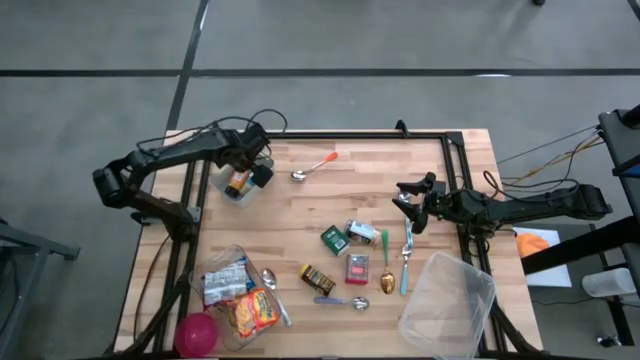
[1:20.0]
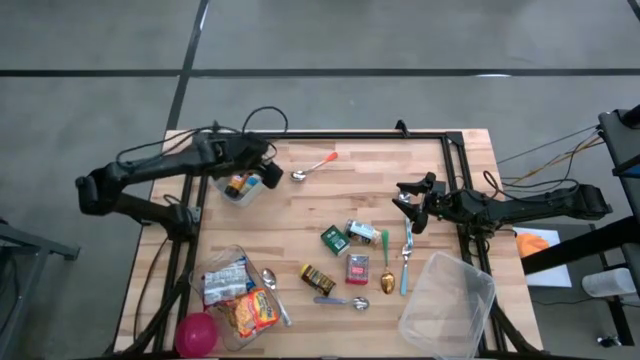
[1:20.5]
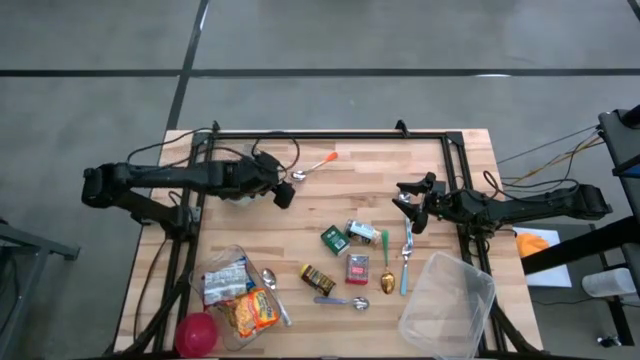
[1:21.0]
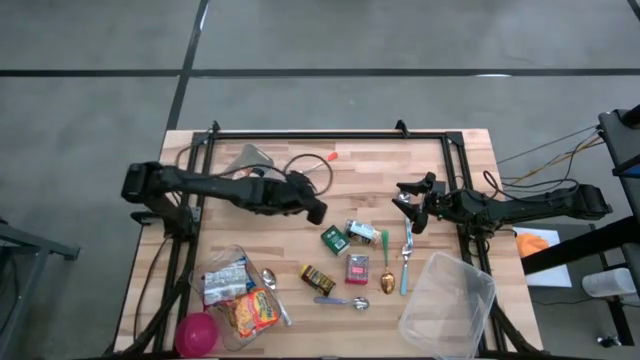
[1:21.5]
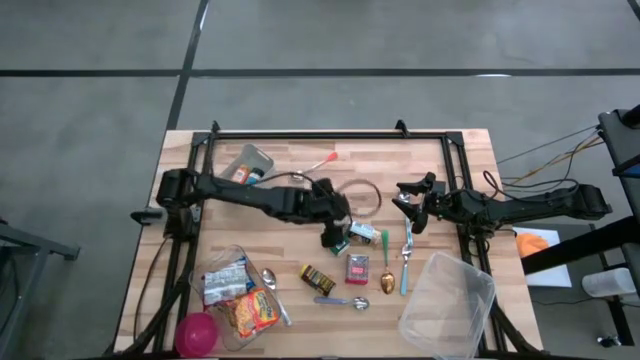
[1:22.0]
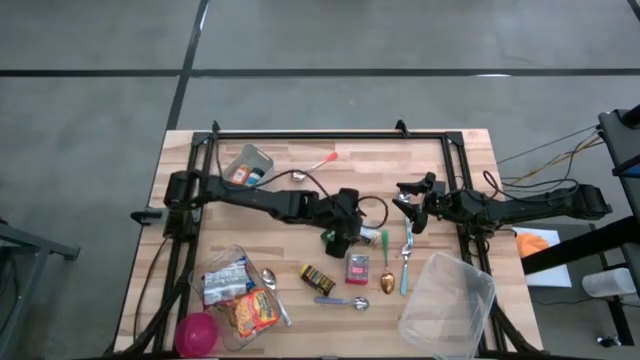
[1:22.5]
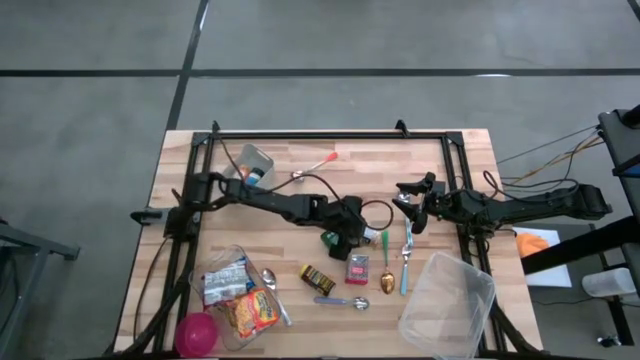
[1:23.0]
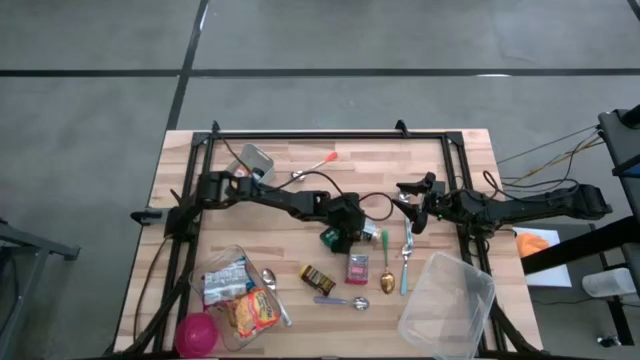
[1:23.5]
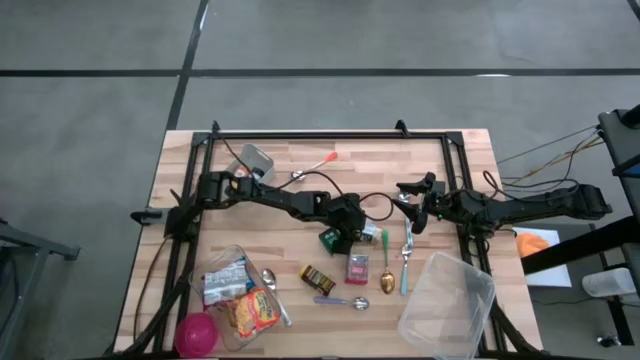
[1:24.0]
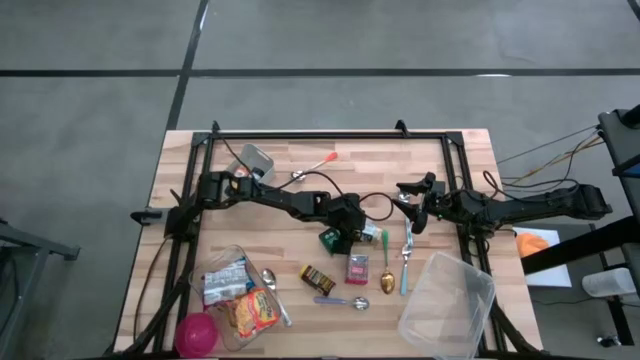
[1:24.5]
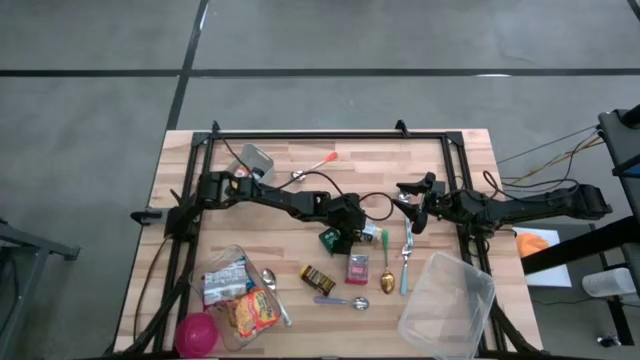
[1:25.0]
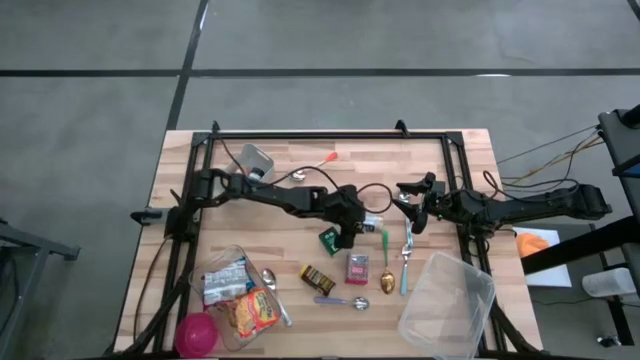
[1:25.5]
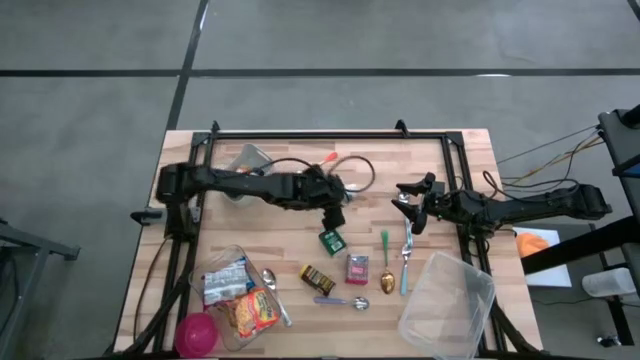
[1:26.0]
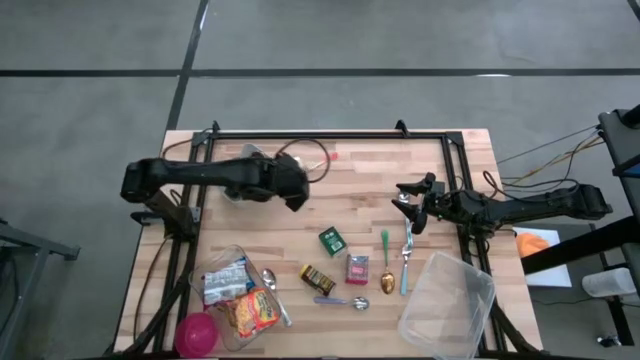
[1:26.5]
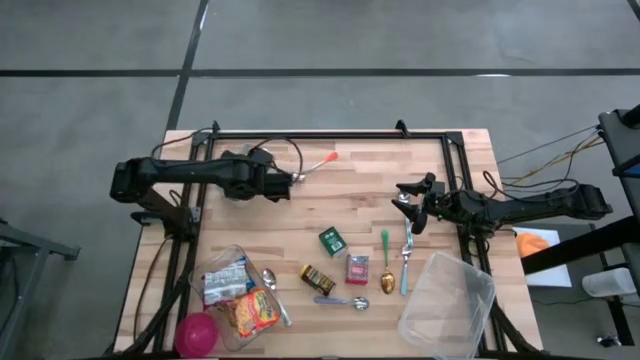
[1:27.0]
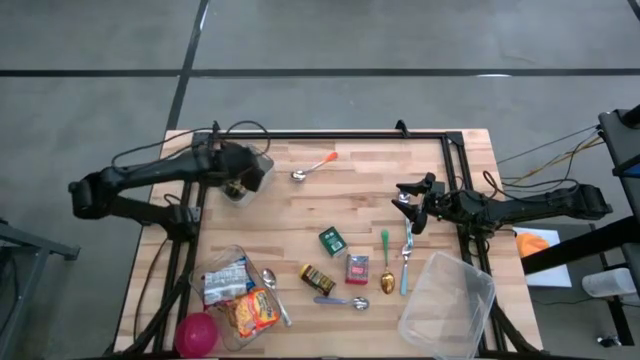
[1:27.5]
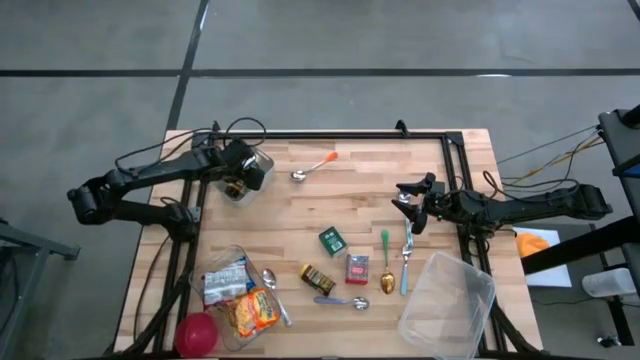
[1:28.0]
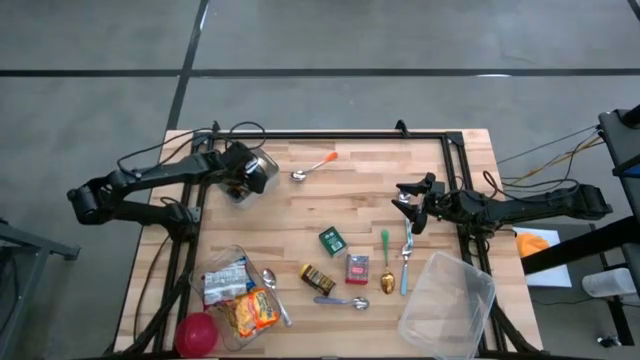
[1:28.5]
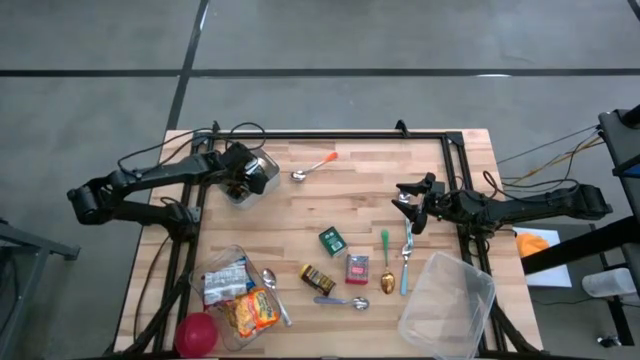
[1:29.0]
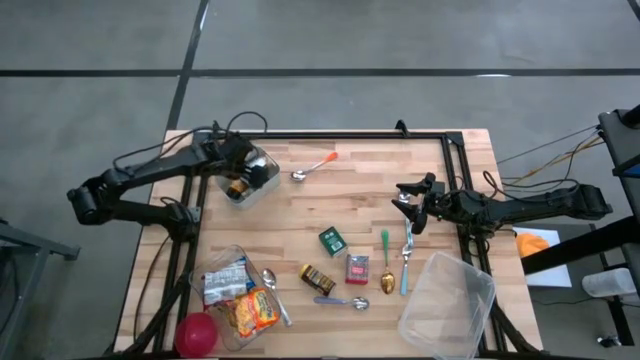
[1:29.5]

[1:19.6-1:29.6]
Put the golden seasoning bottle into the gray bin

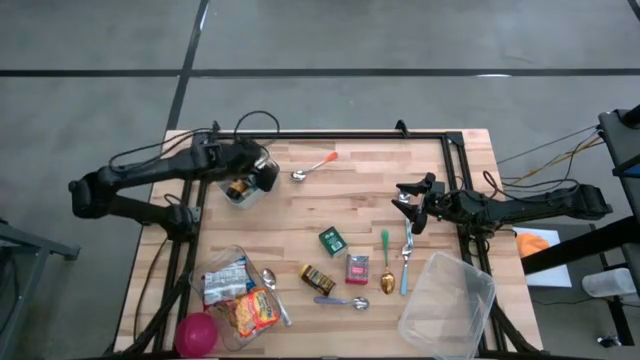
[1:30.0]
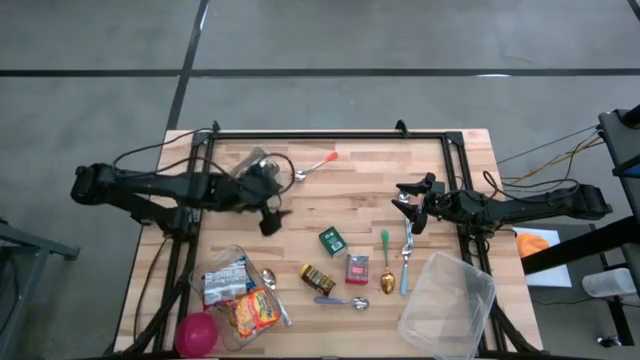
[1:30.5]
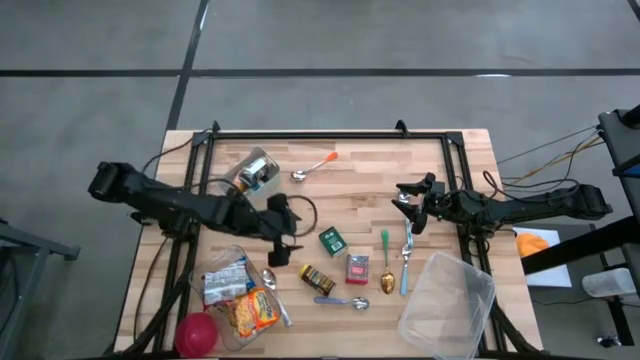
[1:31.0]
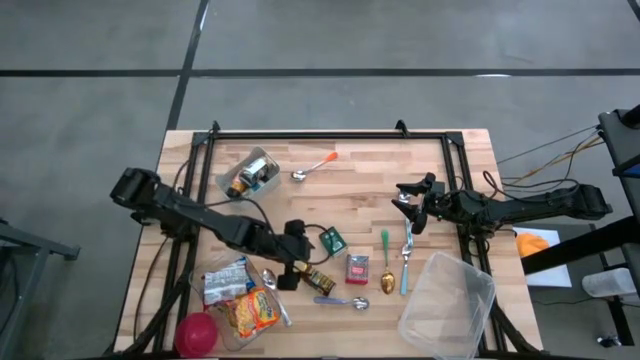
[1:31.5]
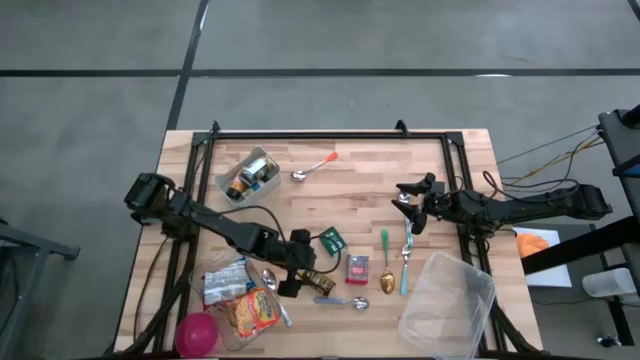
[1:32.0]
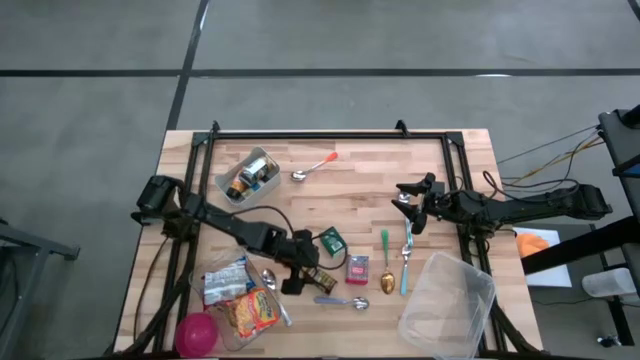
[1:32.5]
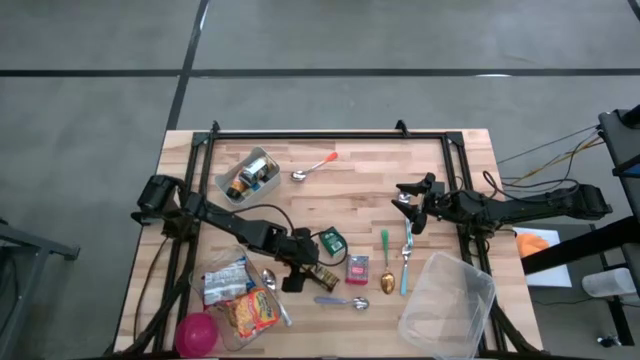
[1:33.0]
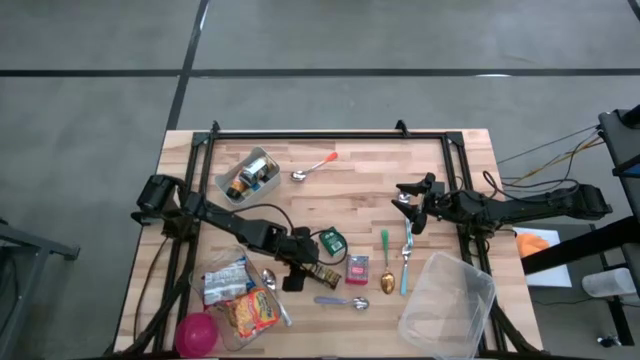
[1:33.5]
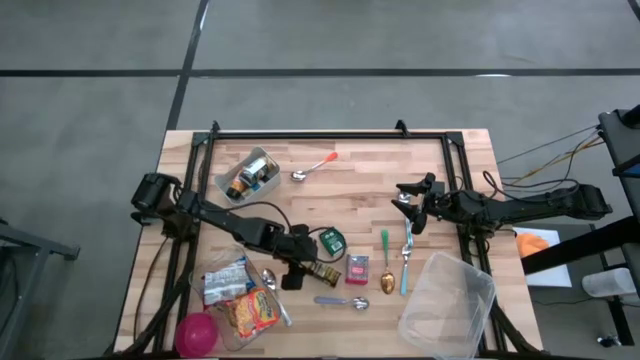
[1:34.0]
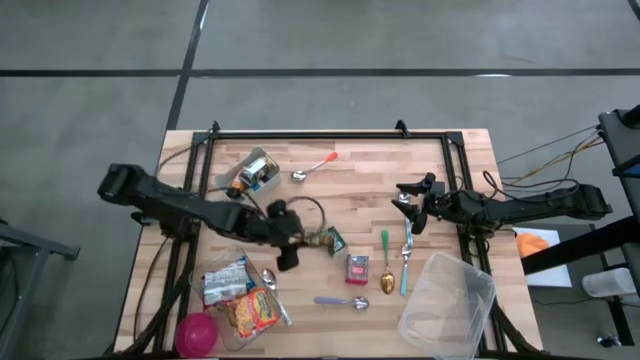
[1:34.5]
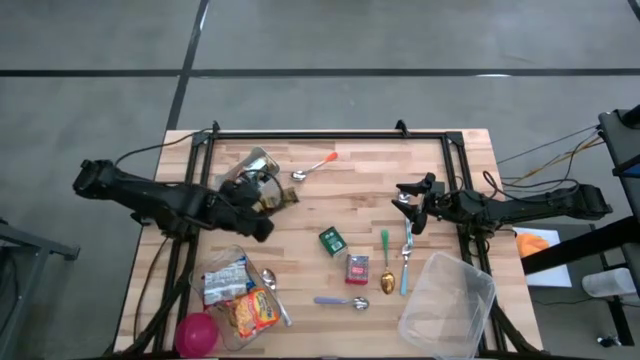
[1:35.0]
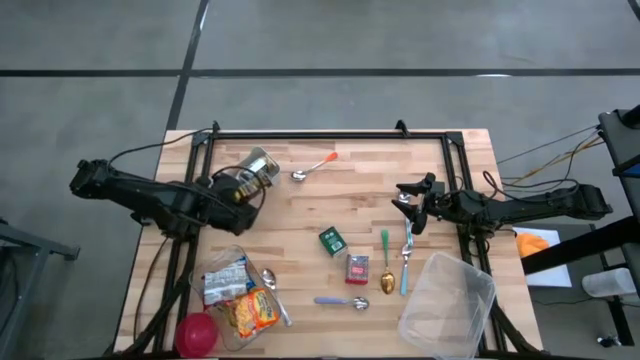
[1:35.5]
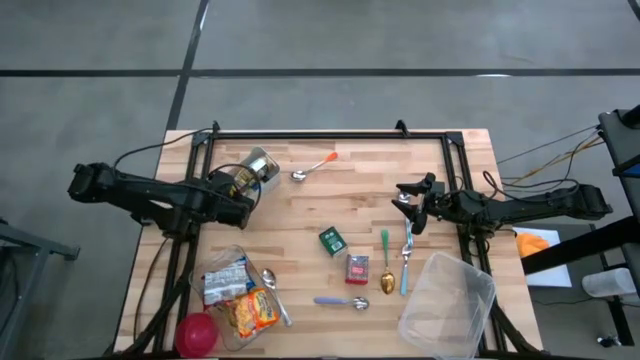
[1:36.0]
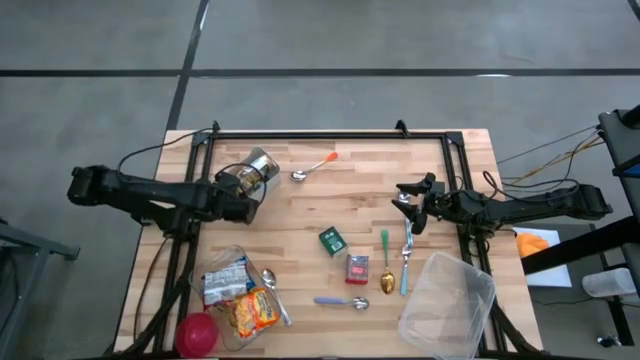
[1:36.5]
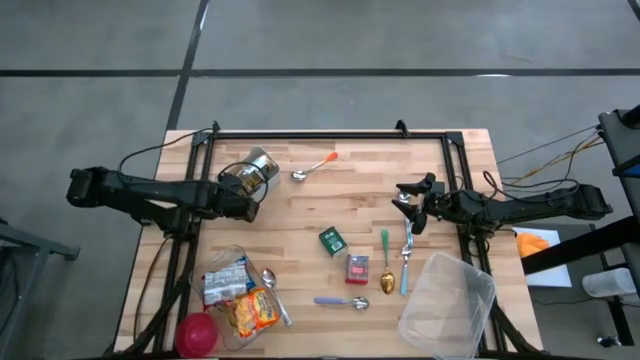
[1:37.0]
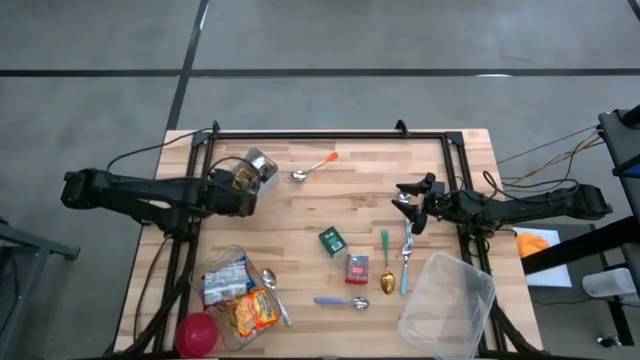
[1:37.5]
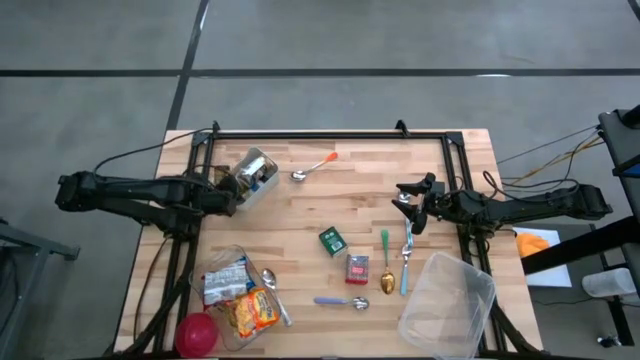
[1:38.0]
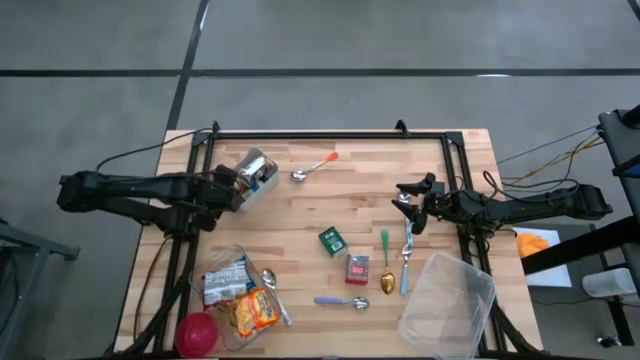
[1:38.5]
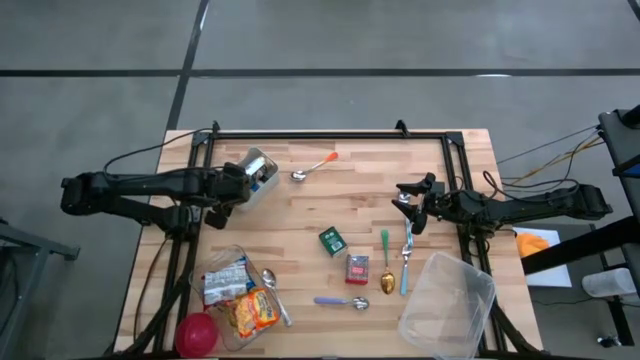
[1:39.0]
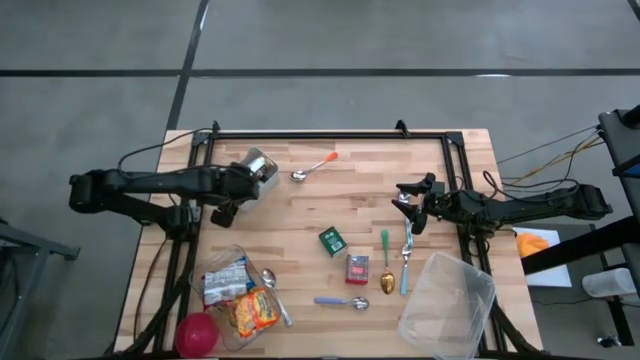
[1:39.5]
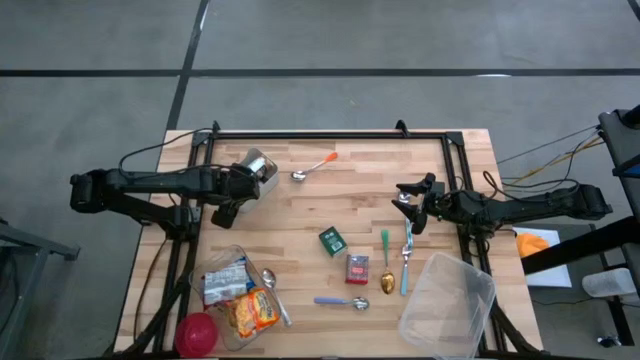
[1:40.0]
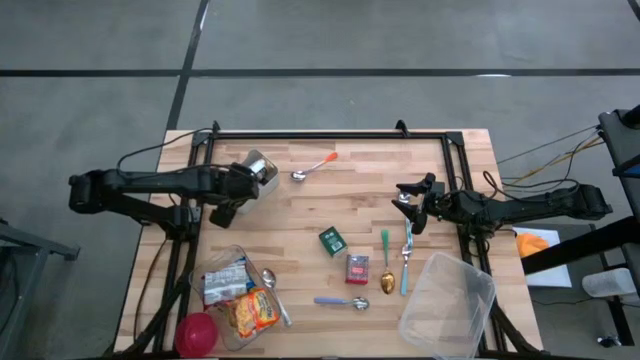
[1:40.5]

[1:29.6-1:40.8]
Put the yellow seasoning can into the gray bin
